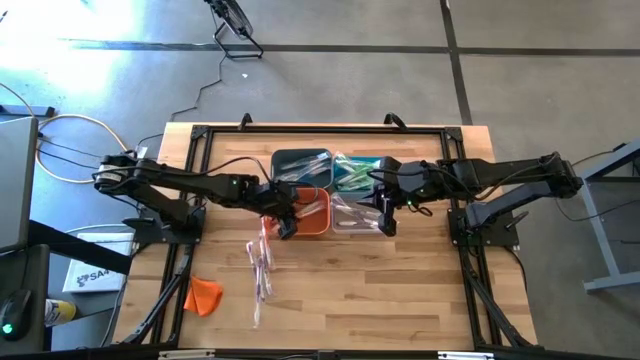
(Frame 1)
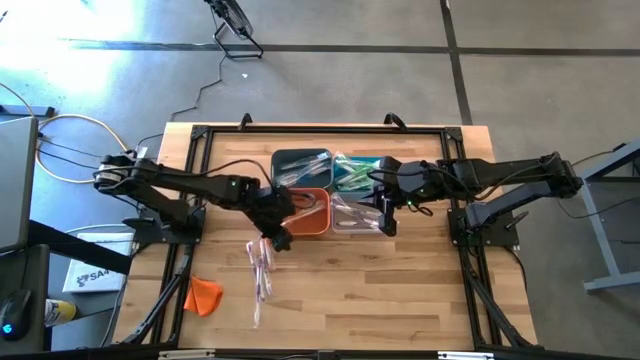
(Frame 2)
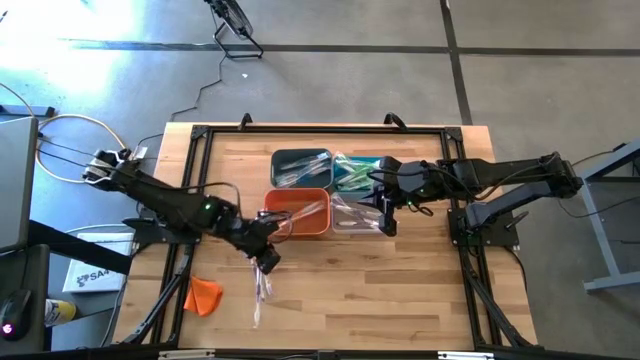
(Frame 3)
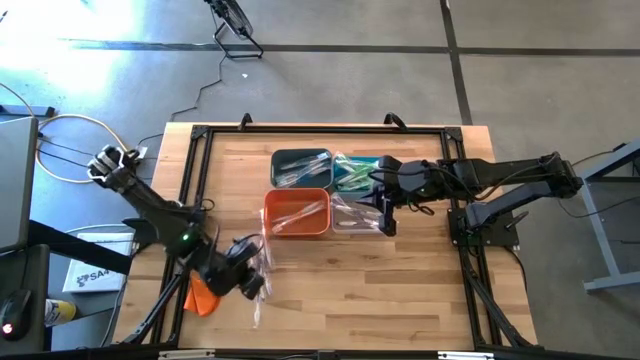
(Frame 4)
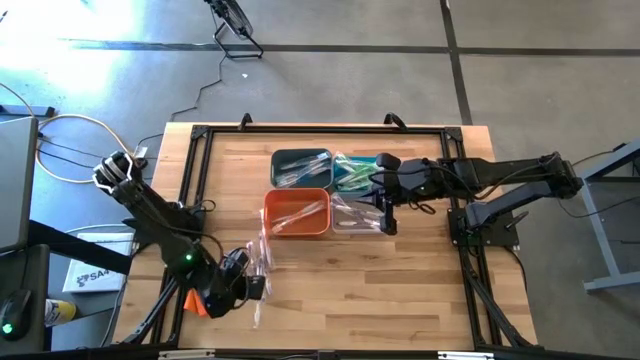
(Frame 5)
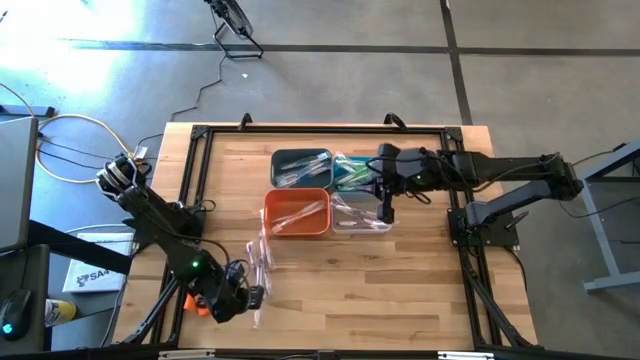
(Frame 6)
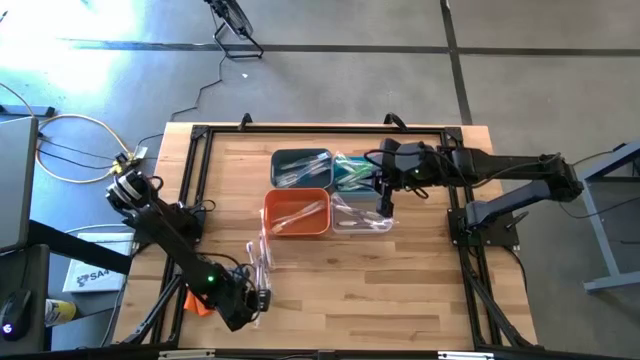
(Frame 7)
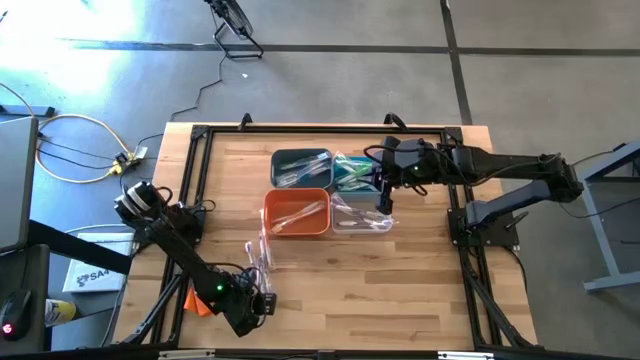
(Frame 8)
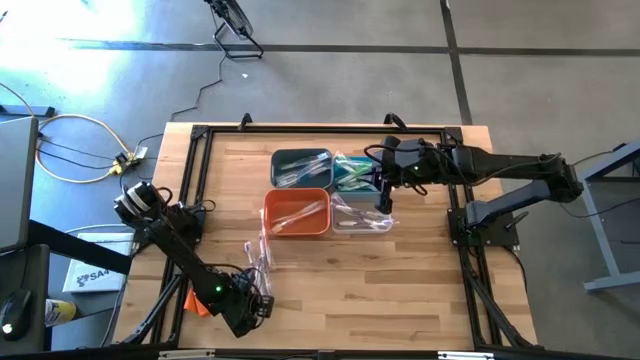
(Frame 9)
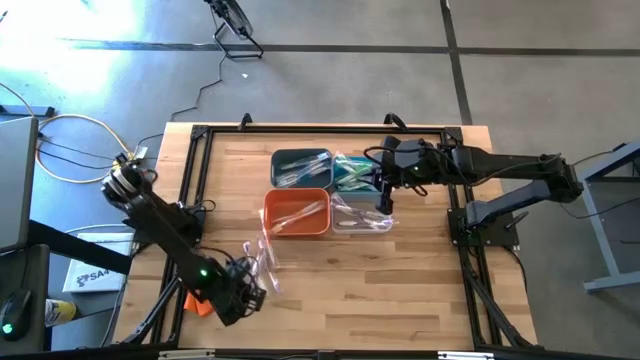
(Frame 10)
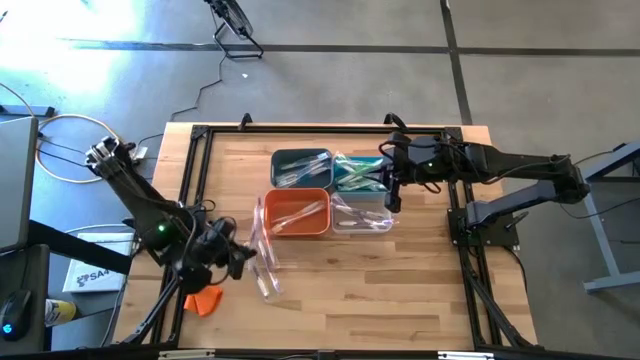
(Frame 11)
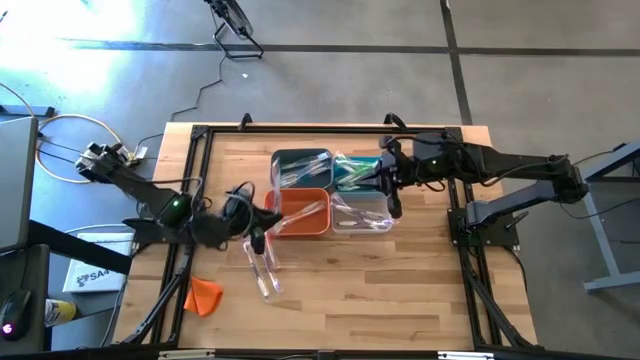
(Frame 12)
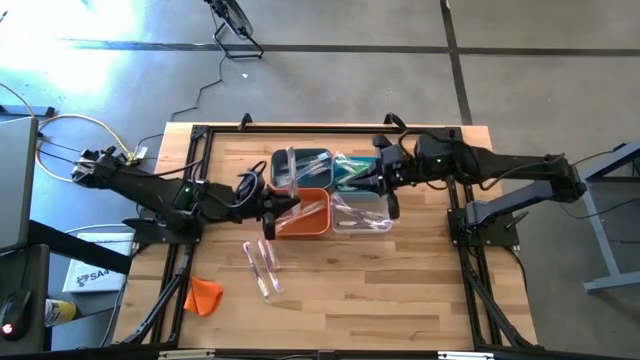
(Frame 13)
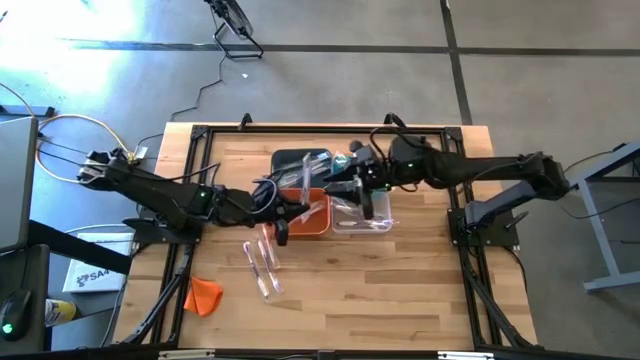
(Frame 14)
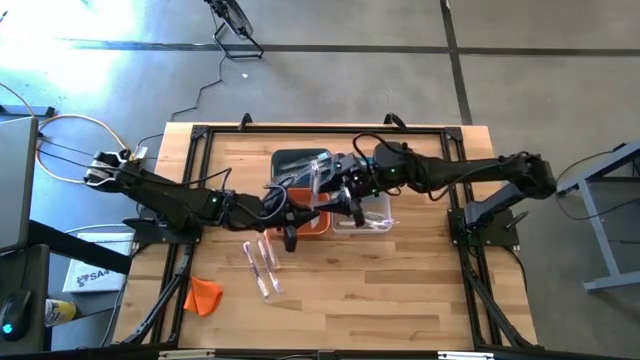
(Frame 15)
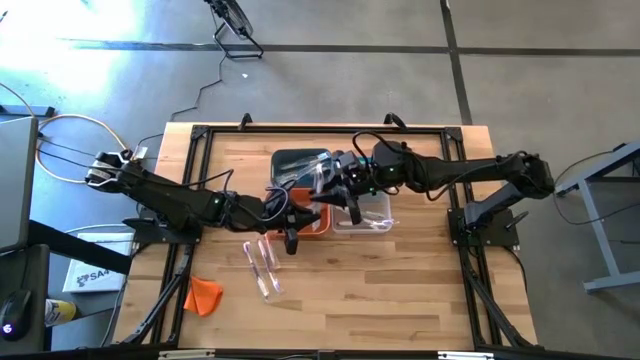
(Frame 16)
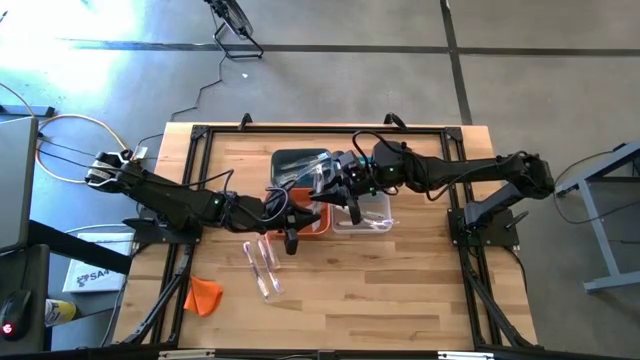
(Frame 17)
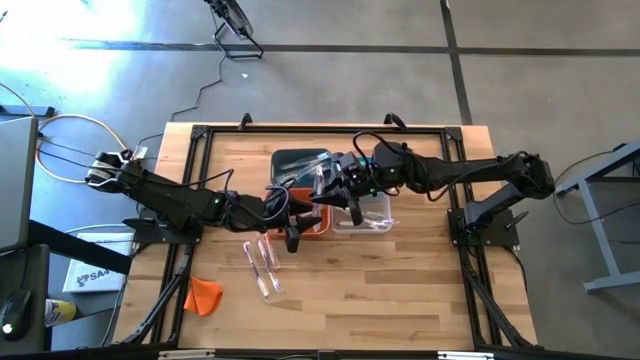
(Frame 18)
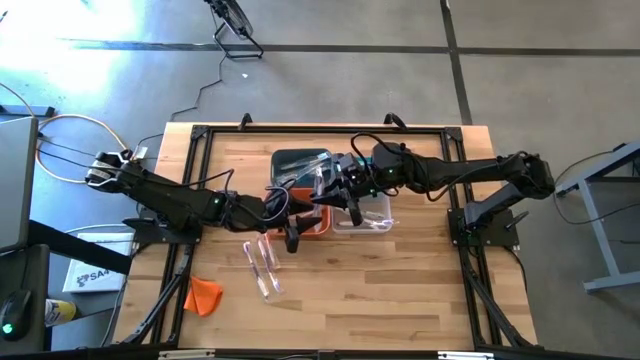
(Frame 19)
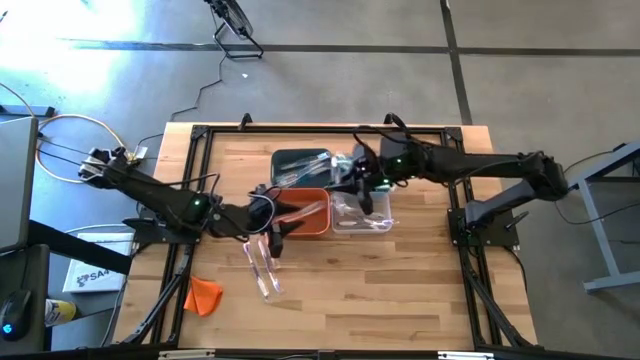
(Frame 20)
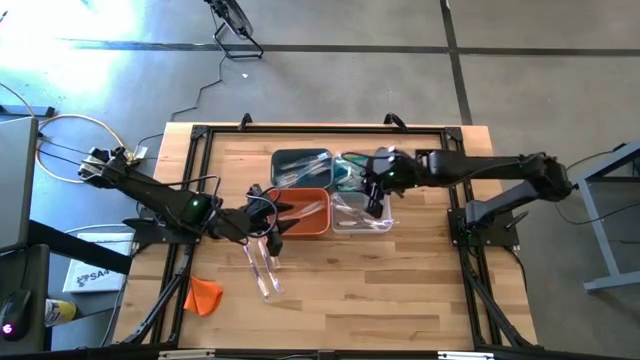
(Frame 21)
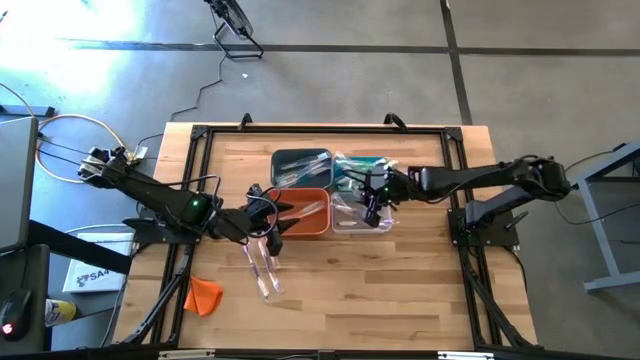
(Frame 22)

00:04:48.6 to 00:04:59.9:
Task: Pick & Place Toothbrushes
Put the purple toothbrush into the transparent bin

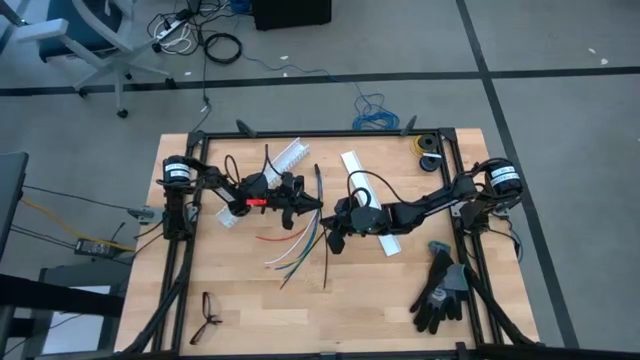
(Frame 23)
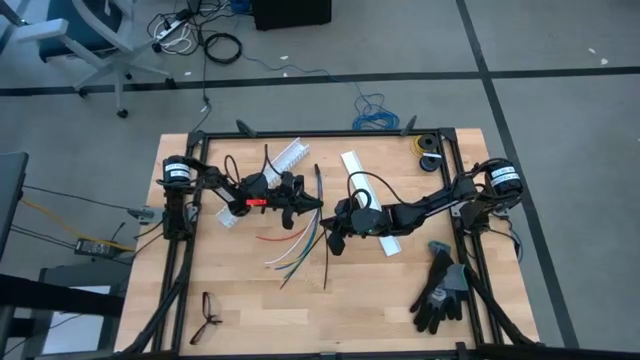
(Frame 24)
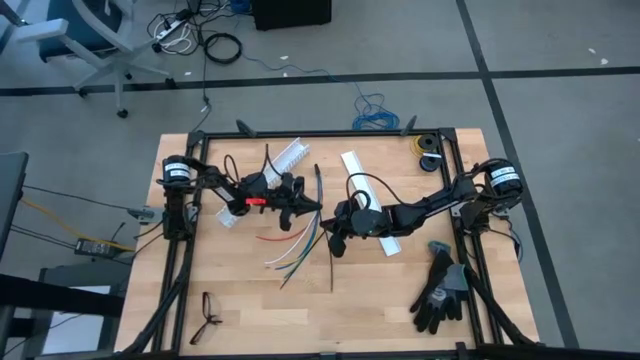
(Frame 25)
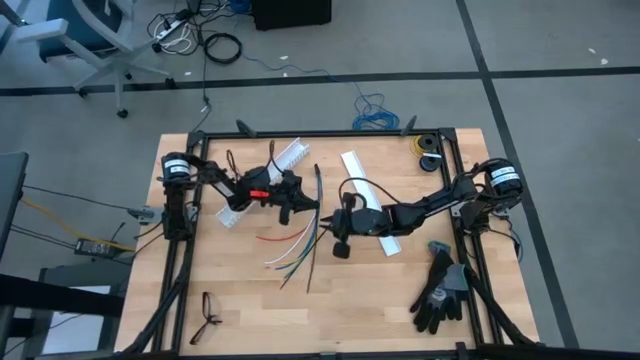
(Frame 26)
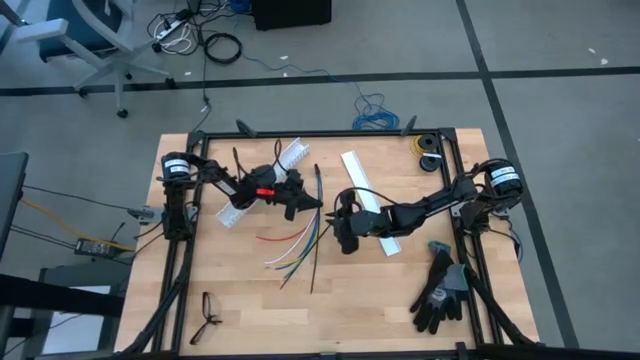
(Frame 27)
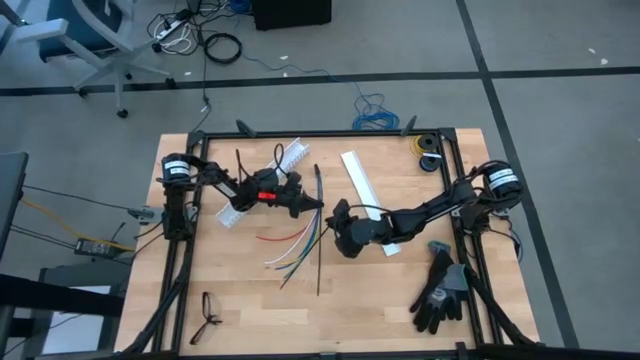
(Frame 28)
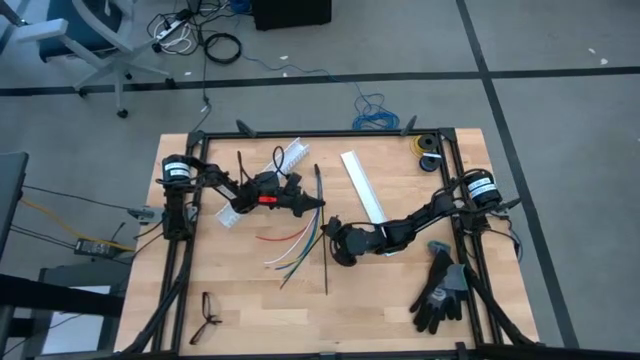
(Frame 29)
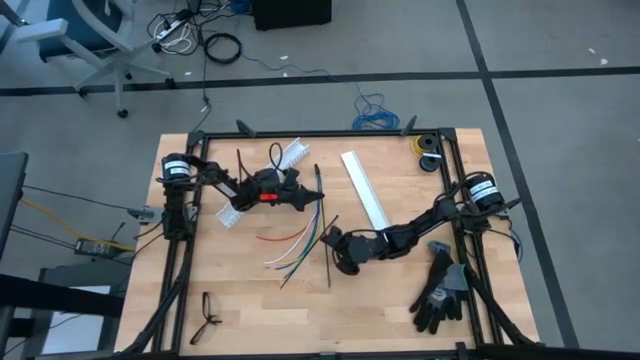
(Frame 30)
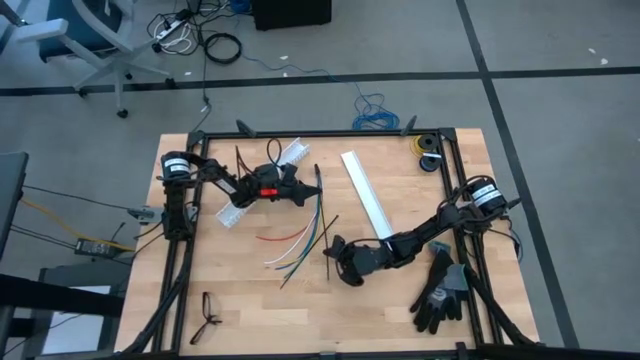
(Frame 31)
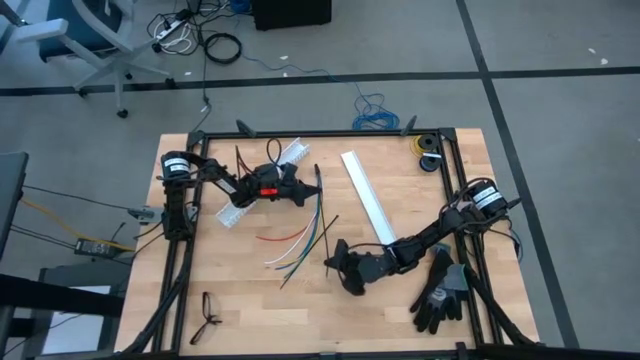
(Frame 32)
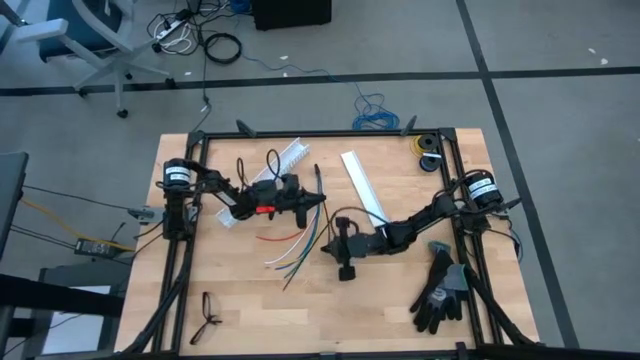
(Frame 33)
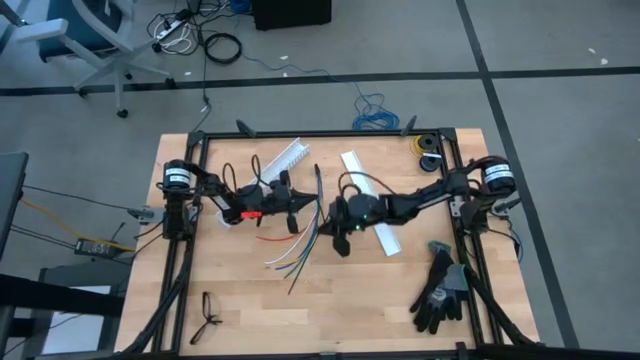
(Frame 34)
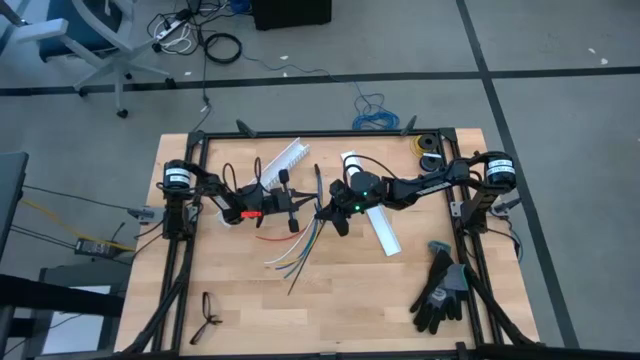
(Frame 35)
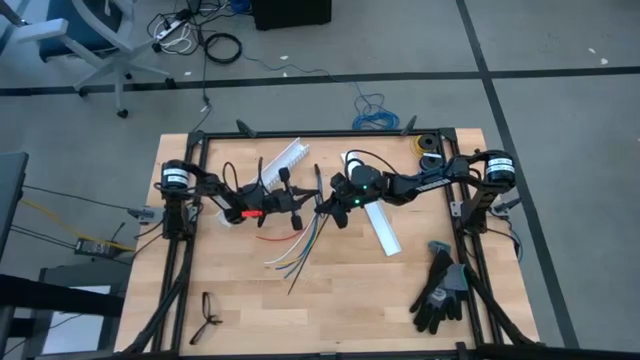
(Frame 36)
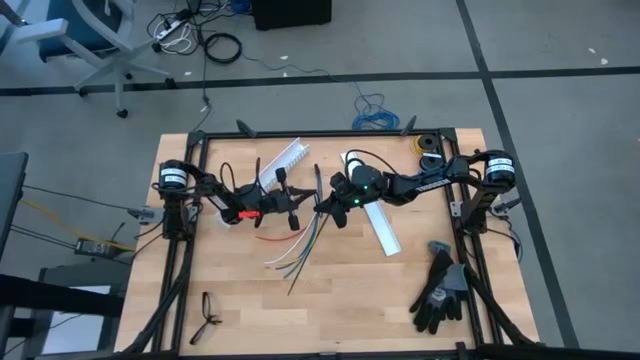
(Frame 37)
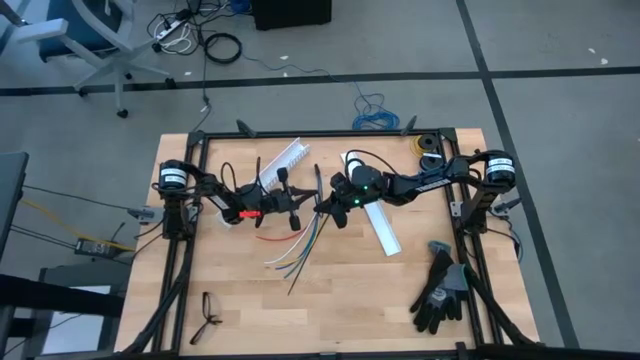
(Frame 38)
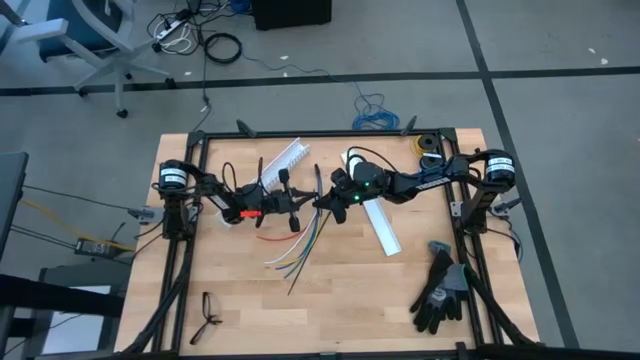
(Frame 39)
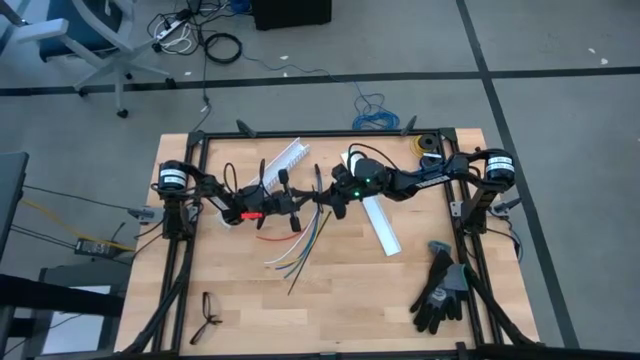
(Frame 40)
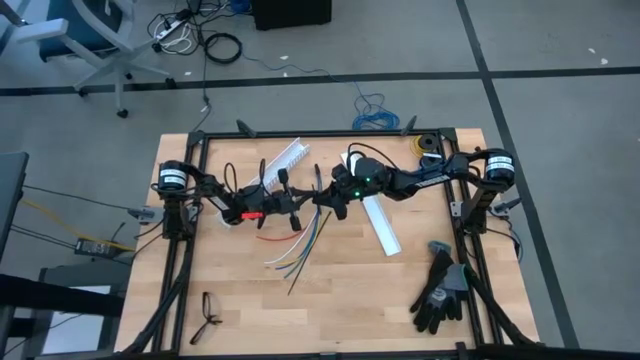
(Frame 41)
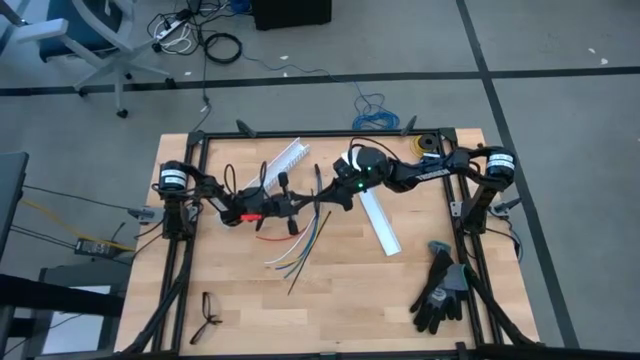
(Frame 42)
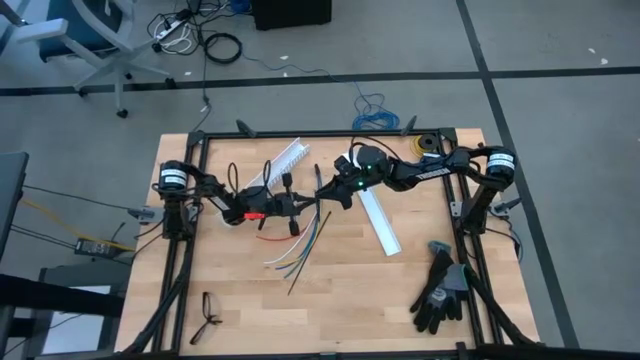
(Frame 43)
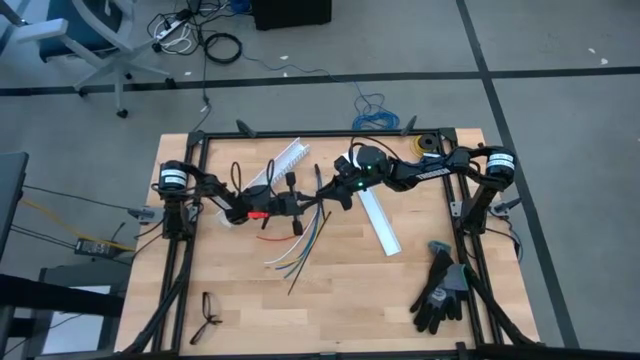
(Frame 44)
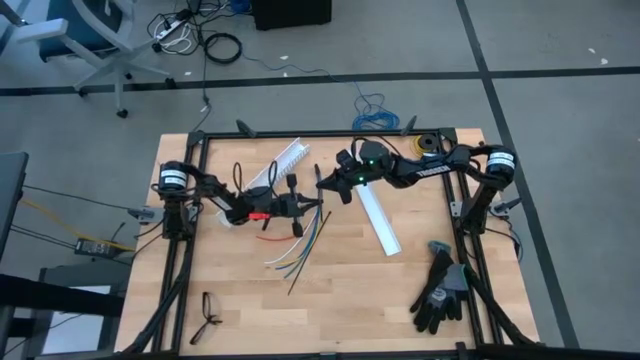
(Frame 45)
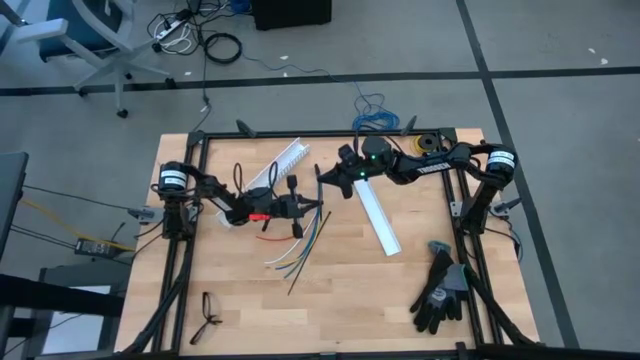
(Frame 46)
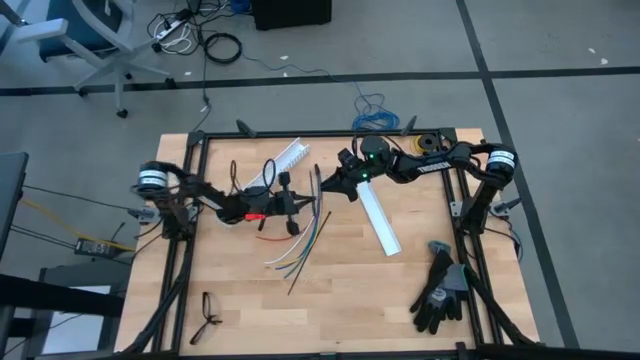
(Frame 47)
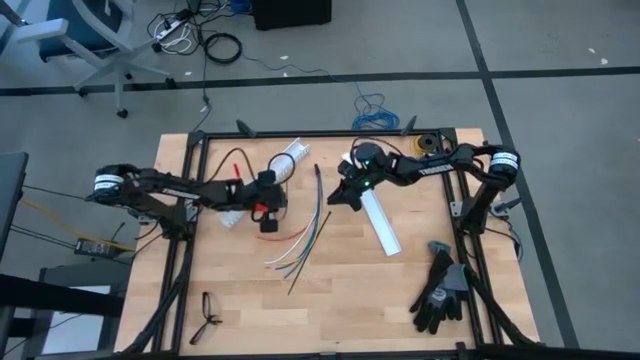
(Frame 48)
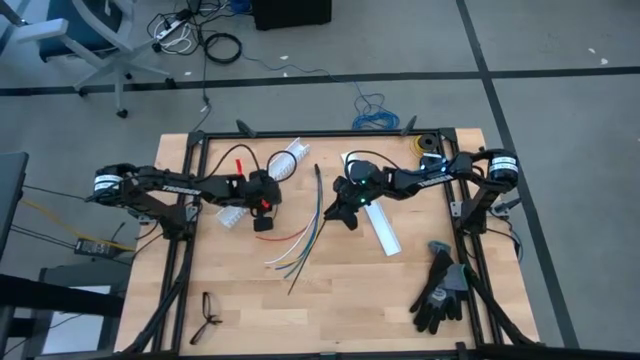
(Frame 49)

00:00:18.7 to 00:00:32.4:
Task: Ziptie cables
Prepare the right black zip tie to wrap the cable wires
